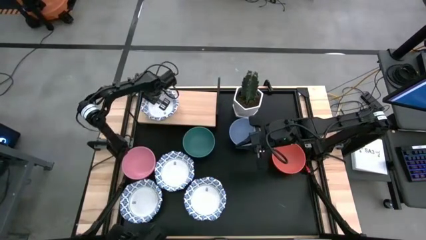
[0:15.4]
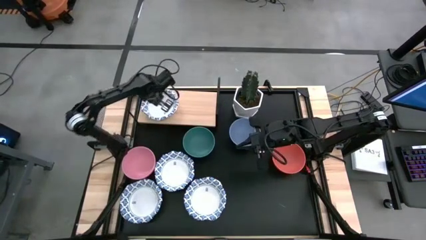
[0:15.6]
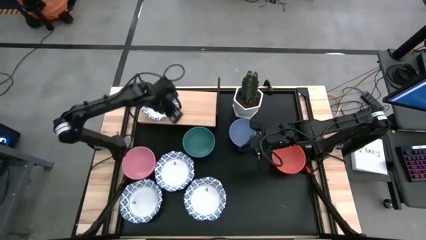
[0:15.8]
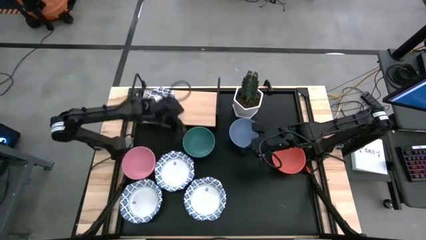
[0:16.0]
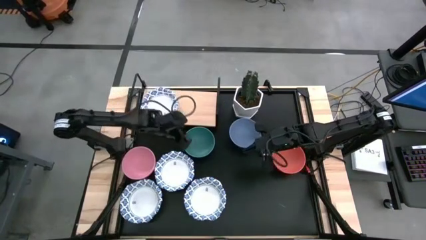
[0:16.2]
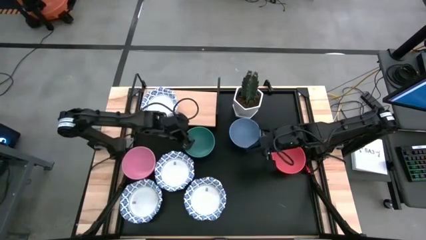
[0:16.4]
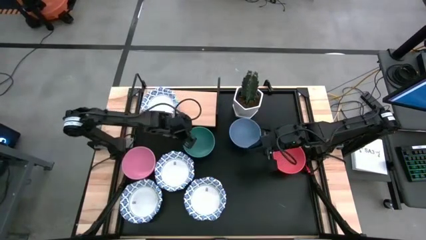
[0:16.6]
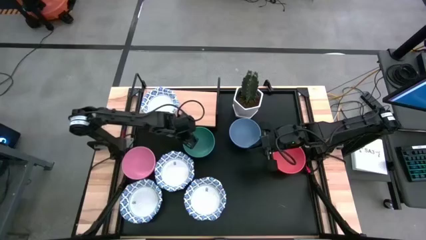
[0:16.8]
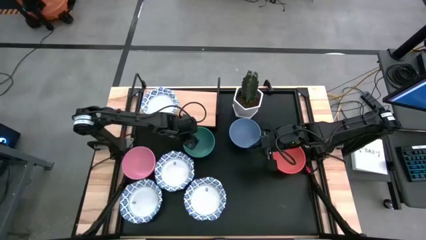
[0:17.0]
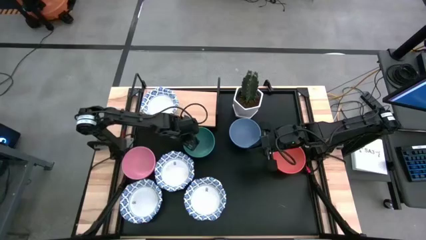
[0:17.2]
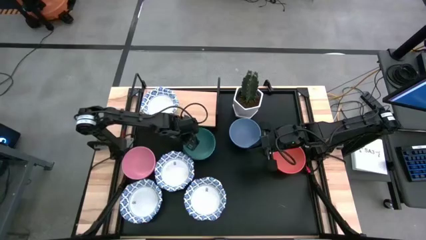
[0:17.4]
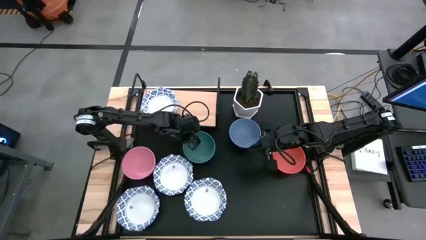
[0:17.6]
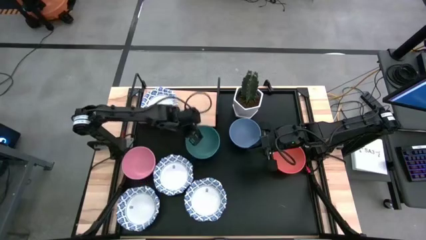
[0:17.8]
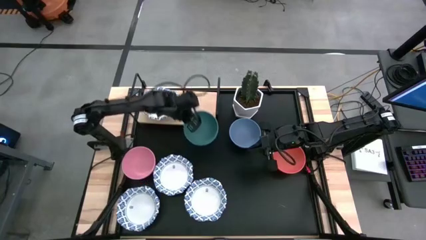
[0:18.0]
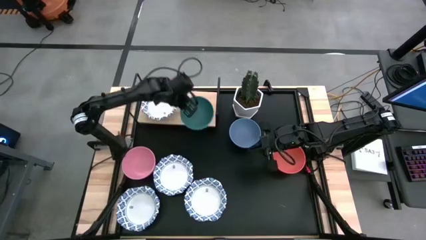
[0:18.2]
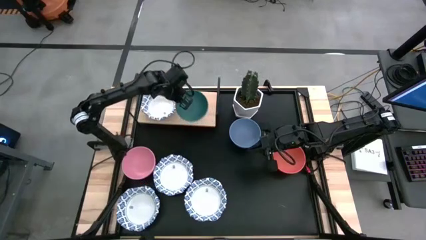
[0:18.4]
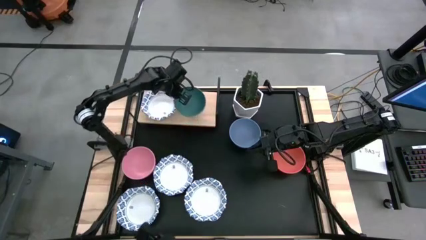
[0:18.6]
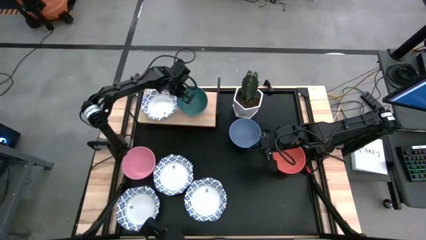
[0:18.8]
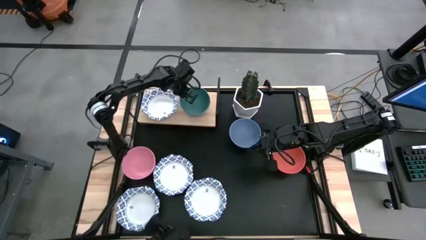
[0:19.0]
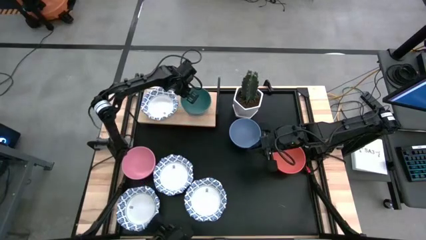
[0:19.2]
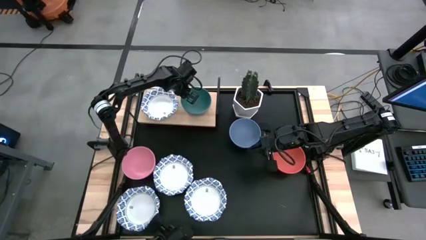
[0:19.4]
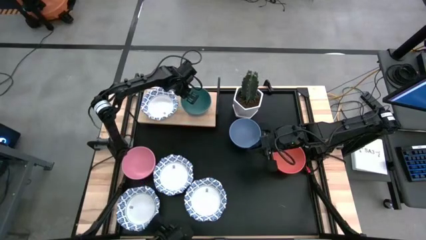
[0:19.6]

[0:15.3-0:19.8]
Task: Place and stack bowls onto a shelf
Put the green bowl on the shelf

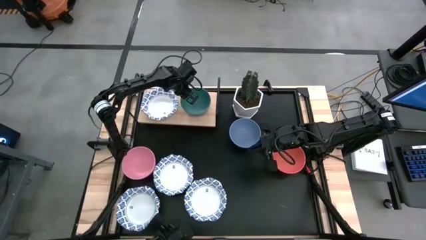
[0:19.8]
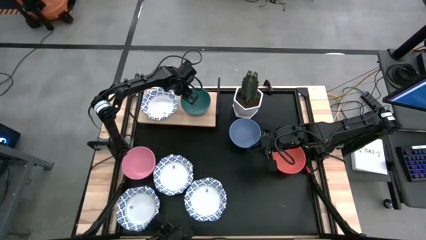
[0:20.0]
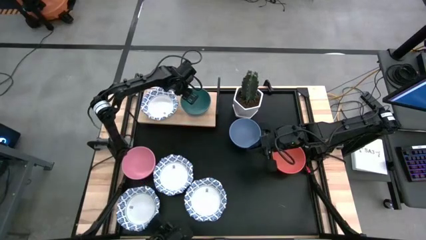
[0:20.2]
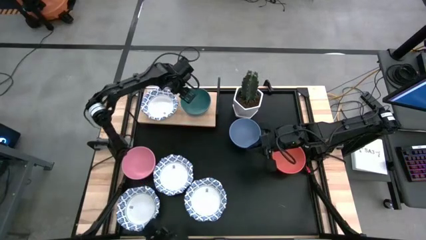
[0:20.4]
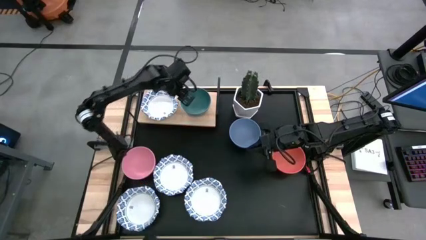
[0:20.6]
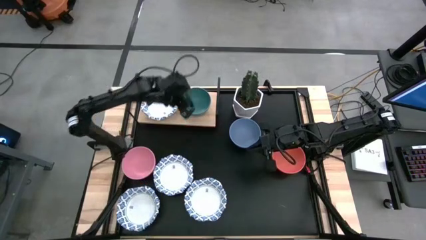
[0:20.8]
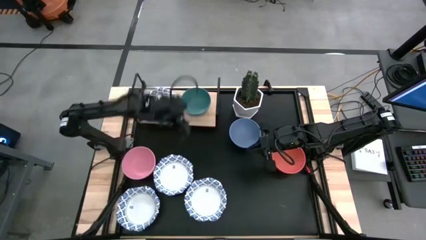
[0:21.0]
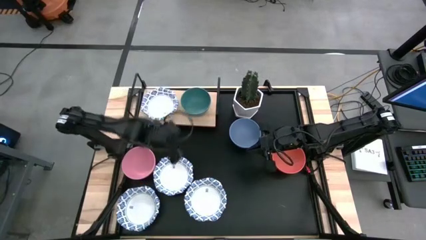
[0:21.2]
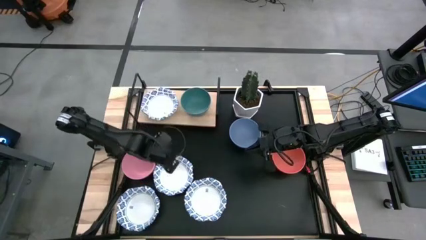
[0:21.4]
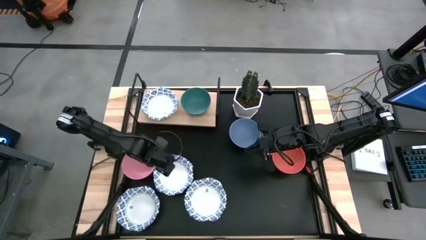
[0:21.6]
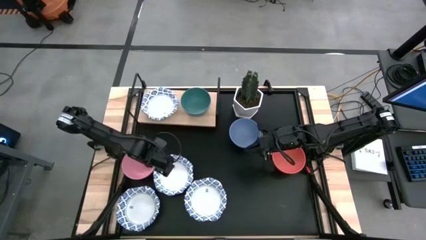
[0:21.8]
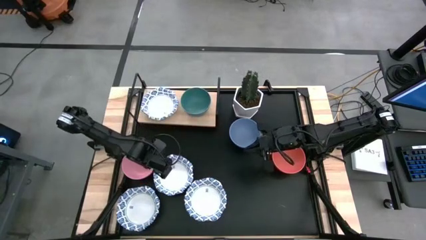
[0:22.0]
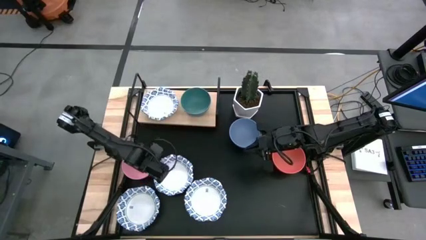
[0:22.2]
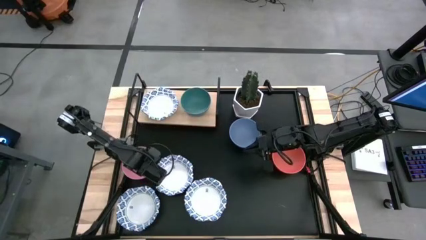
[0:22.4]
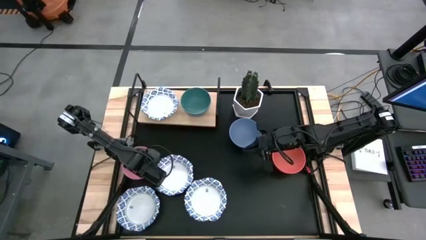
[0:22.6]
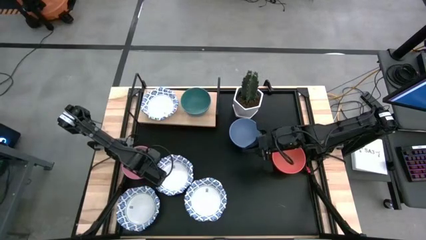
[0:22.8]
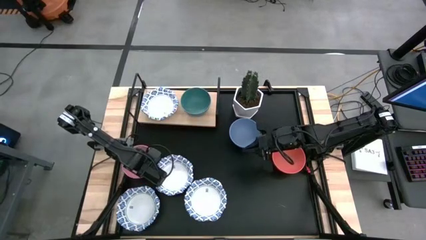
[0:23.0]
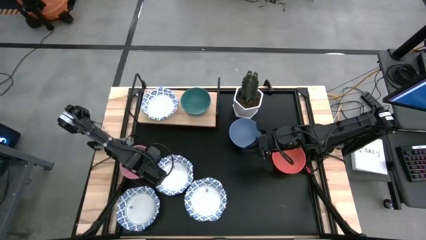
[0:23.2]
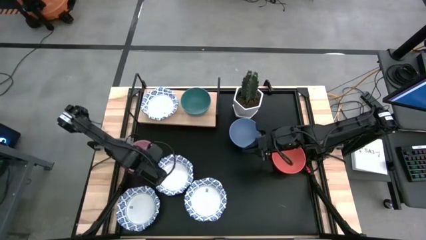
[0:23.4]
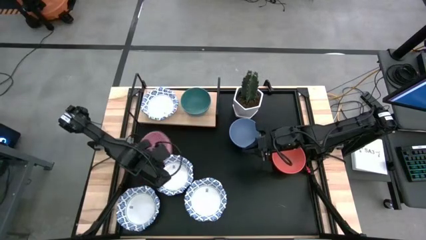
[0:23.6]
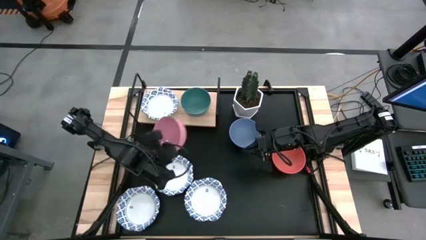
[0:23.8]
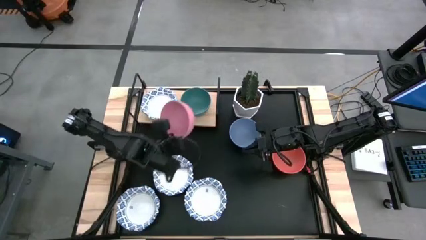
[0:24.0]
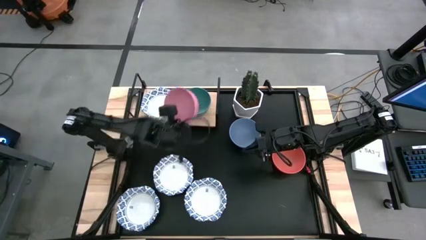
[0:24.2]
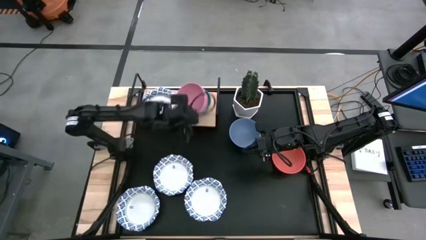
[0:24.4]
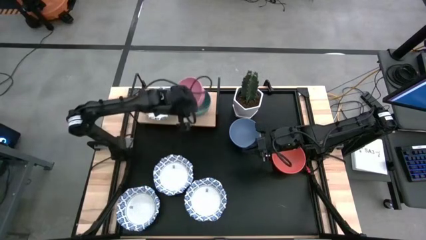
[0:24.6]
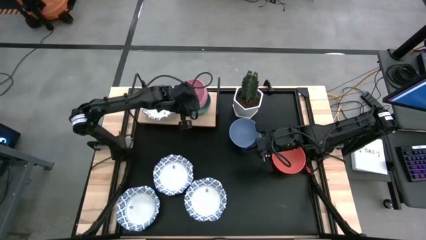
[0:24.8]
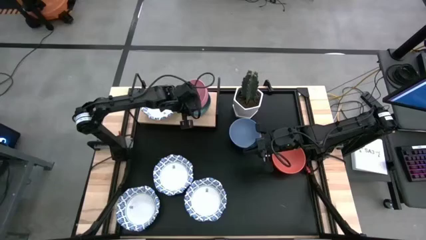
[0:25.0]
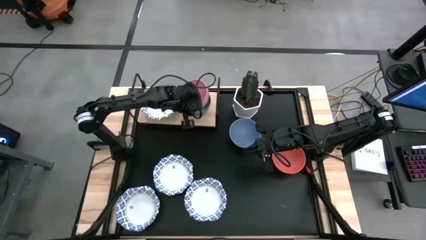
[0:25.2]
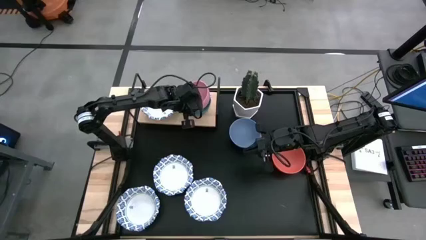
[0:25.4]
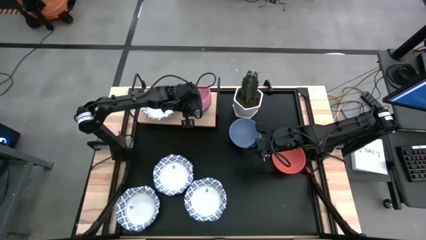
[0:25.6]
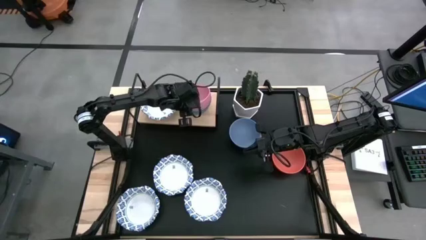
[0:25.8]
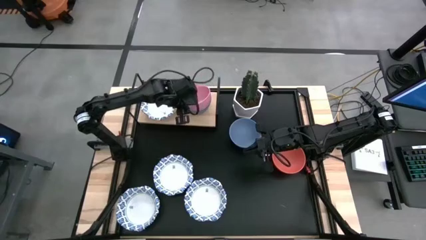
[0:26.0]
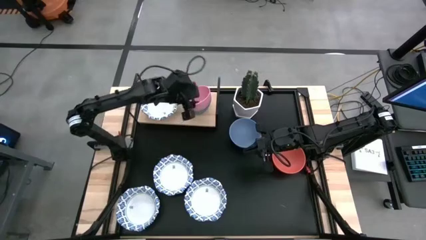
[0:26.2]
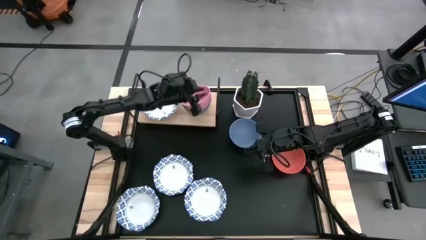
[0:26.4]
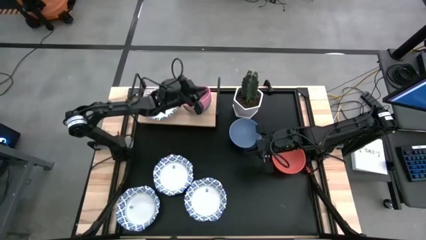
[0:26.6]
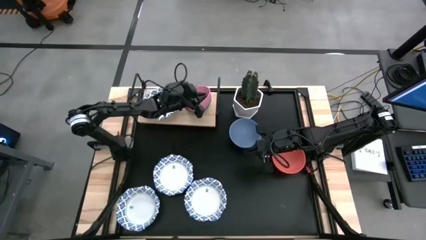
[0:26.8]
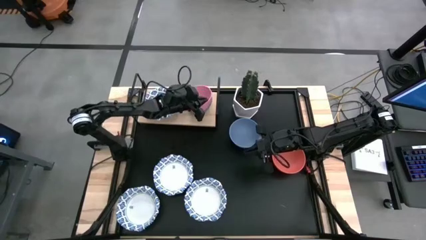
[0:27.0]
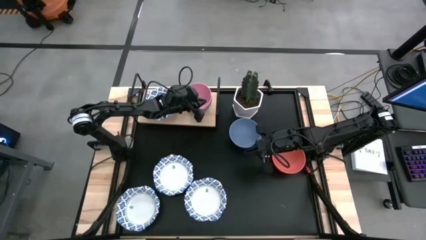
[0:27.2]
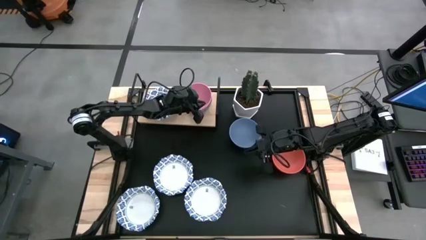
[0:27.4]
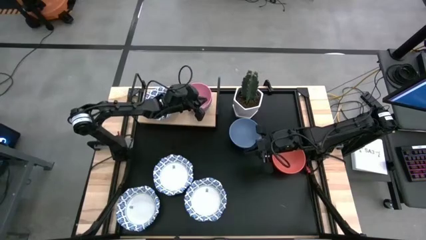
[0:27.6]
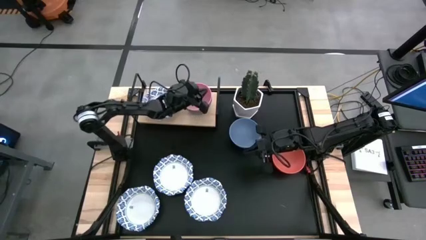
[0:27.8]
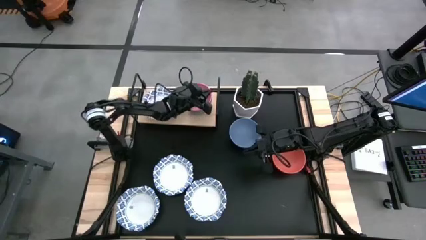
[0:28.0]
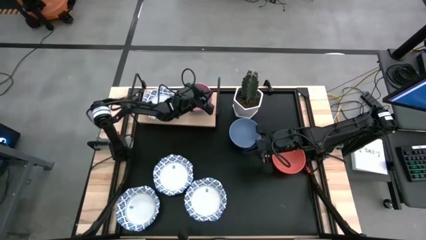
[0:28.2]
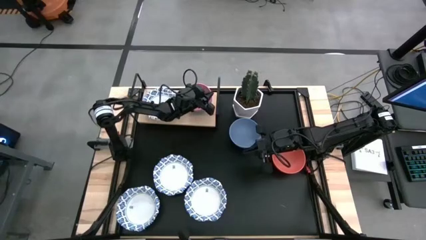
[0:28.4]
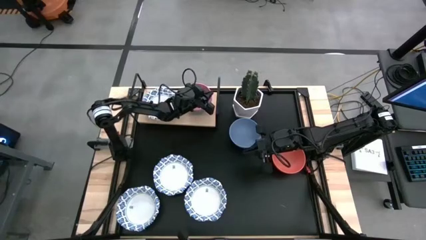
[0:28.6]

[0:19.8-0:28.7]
Stack the pink bowl on top of the green bowl on the shelf

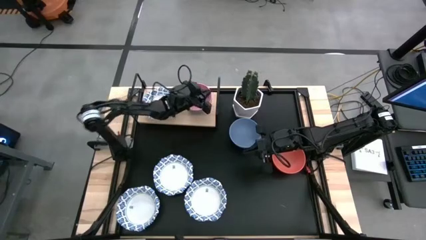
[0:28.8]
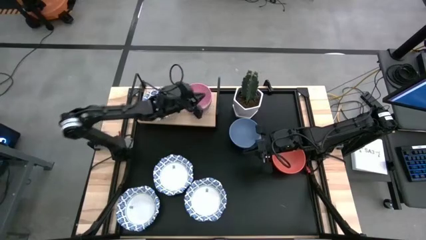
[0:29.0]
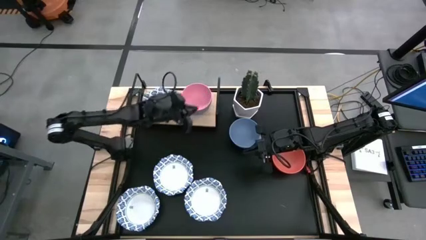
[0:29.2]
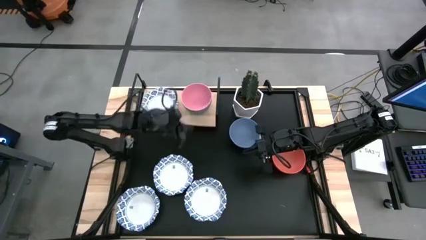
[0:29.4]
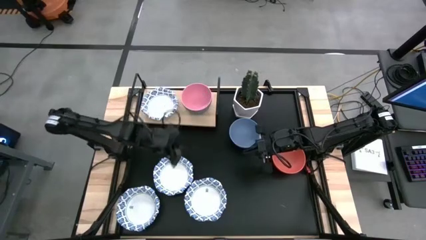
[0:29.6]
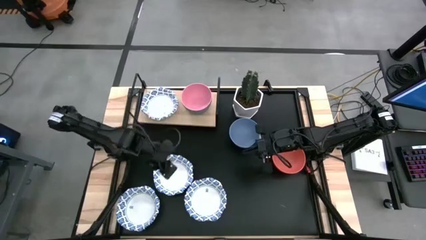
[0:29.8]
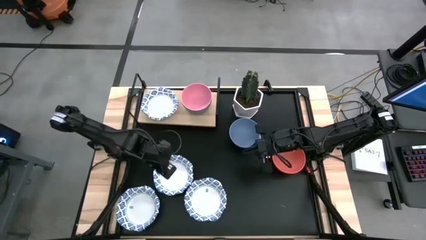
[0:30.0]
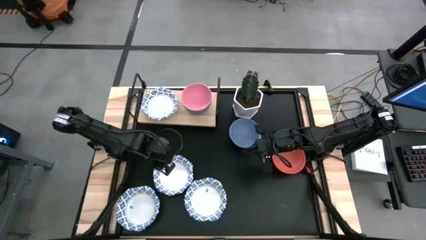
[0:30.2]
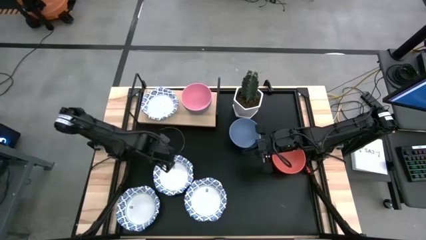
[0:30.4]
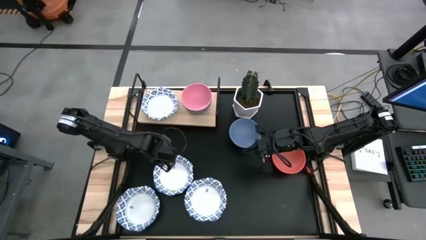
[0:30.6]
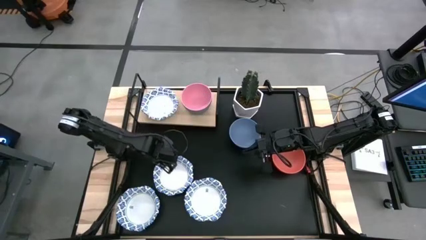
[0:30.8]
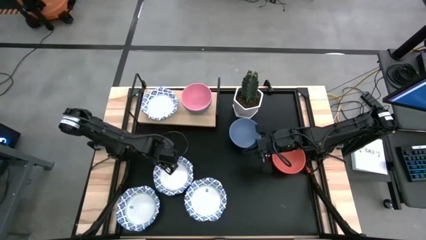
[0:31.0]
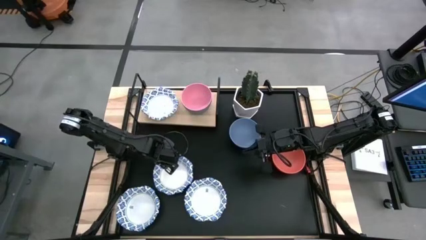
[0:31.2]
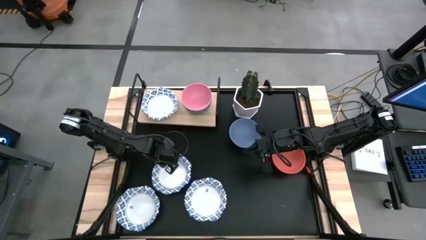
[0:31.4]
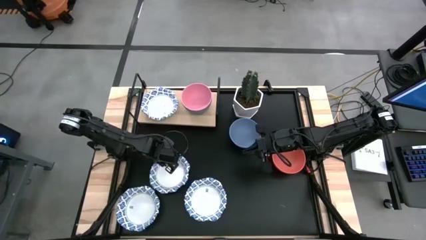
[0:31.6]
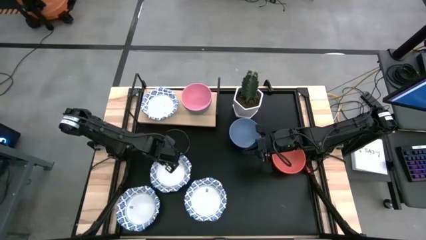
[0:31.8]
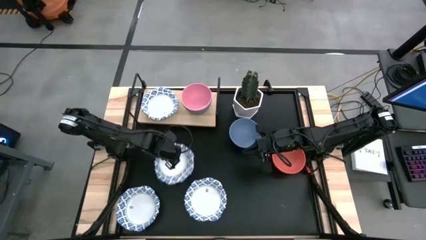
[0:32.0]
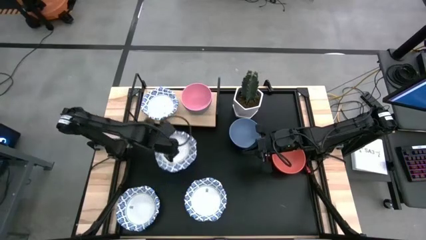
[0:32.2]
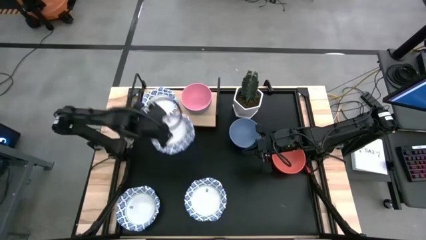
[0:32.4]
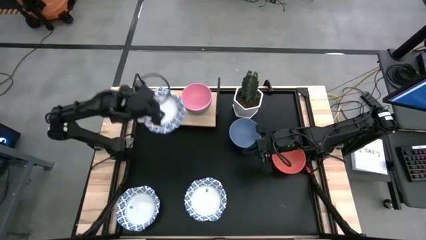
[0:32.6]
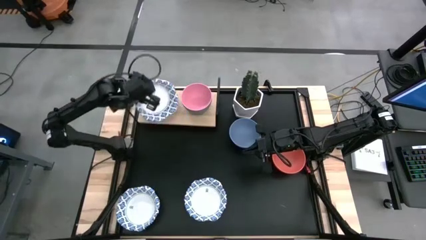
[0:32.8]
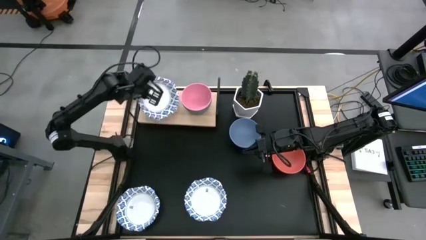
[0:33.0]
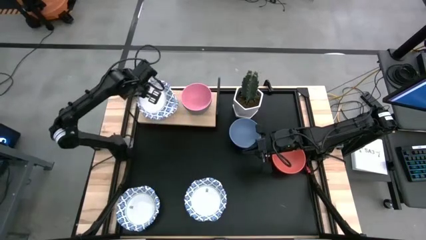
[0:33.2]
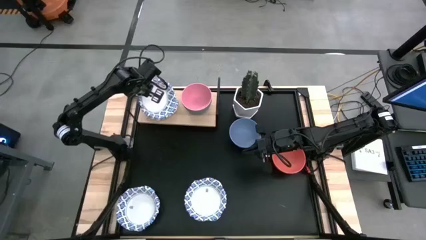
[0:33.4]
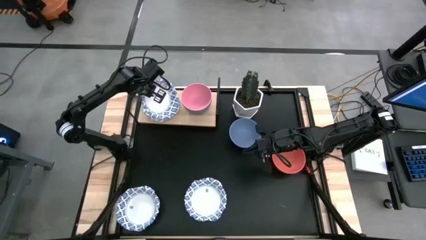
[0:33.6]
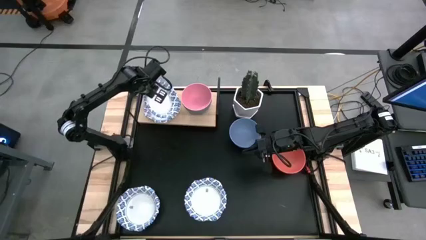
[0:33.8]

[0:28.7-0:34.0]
Stack the center white patterned paper bowl on top of the white patterned paper bowl on the shelf
